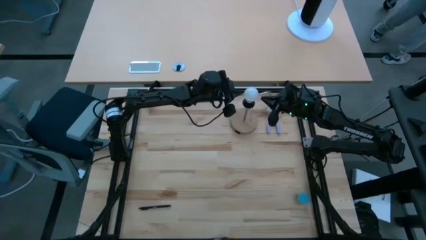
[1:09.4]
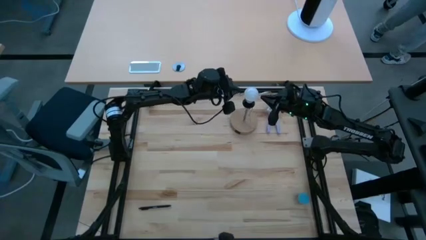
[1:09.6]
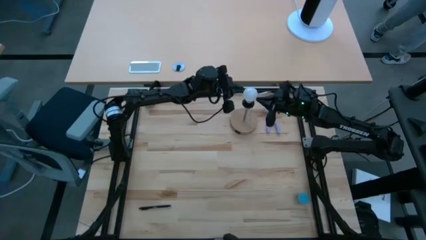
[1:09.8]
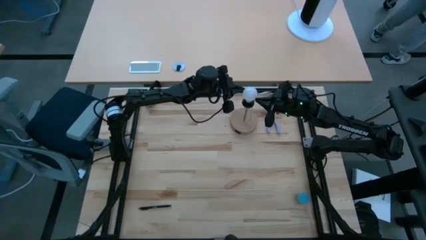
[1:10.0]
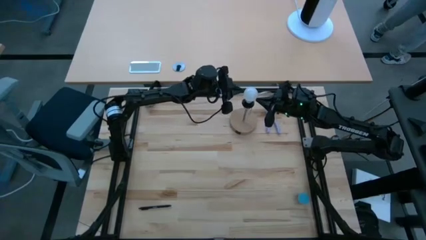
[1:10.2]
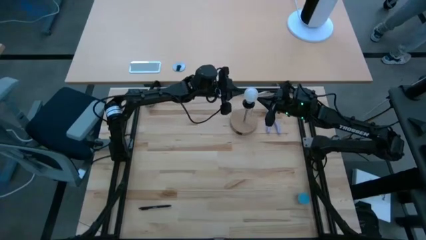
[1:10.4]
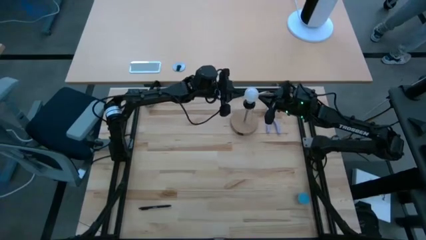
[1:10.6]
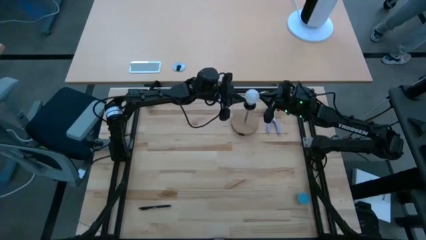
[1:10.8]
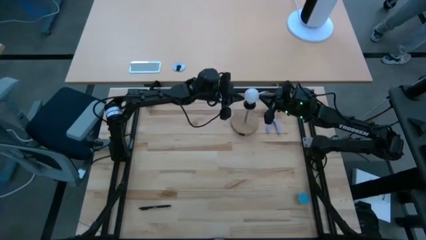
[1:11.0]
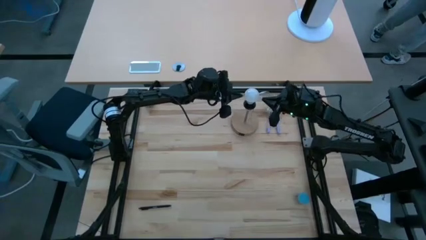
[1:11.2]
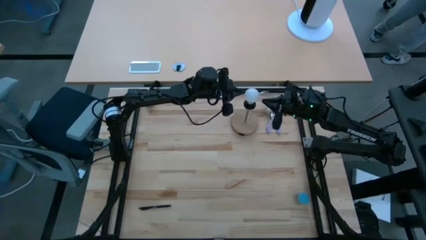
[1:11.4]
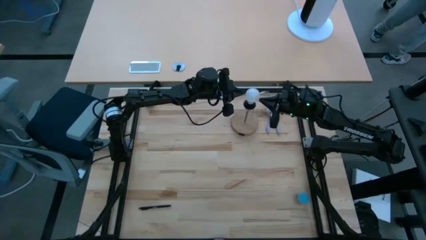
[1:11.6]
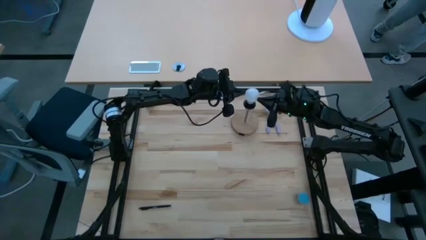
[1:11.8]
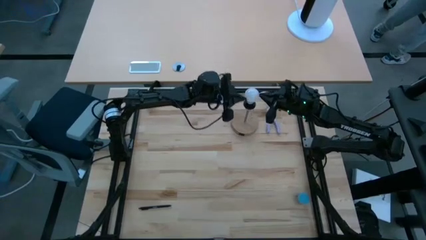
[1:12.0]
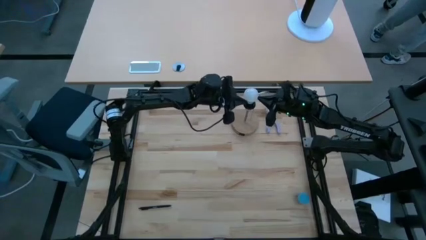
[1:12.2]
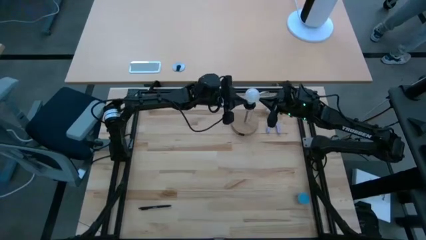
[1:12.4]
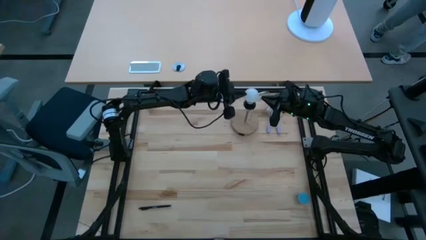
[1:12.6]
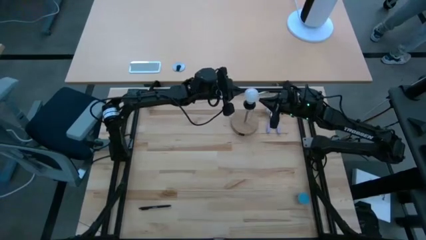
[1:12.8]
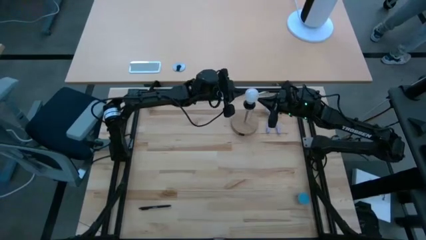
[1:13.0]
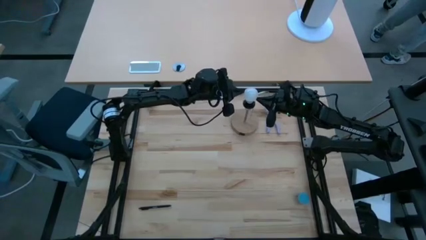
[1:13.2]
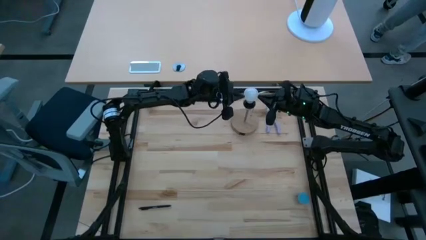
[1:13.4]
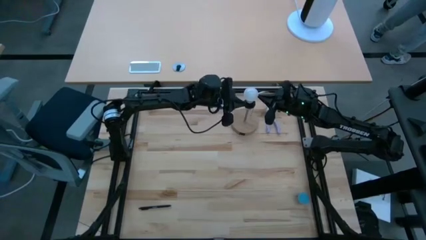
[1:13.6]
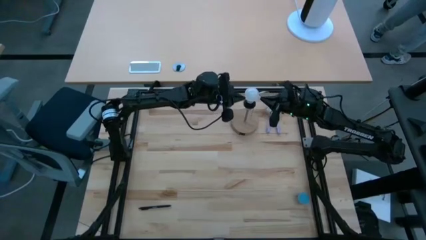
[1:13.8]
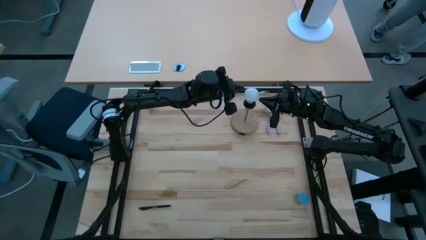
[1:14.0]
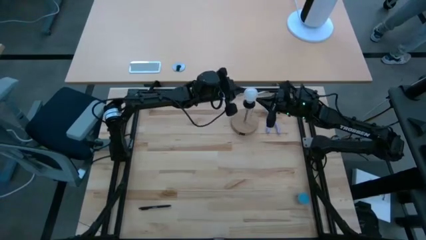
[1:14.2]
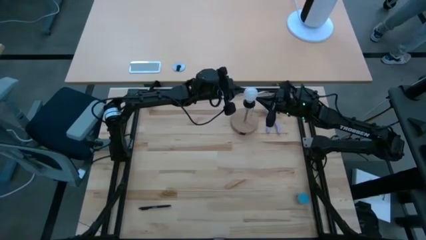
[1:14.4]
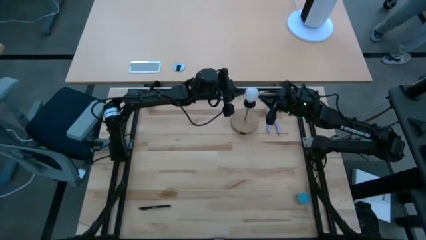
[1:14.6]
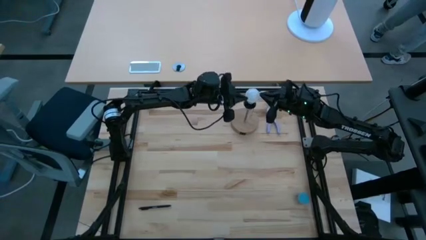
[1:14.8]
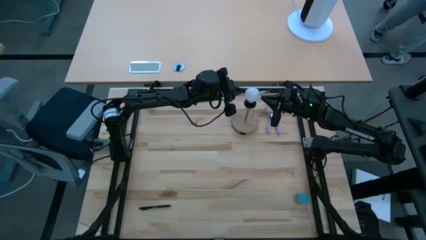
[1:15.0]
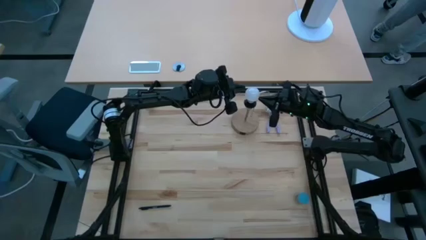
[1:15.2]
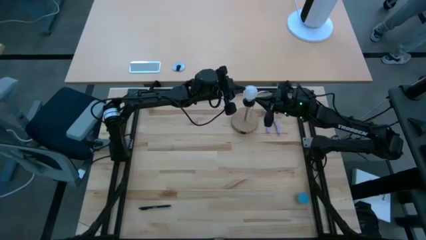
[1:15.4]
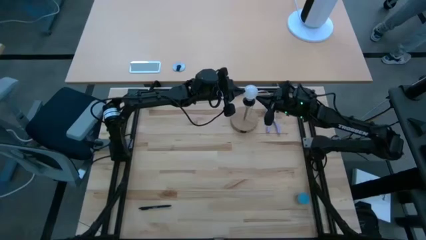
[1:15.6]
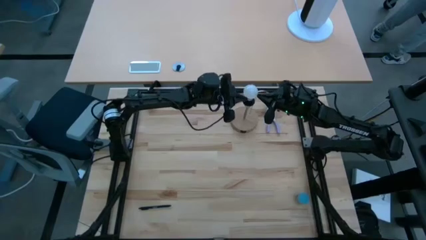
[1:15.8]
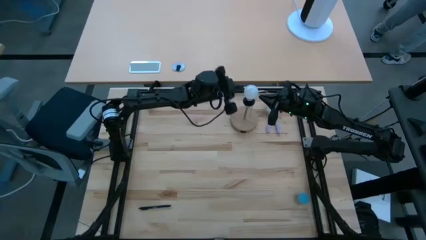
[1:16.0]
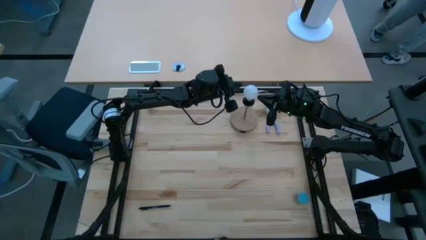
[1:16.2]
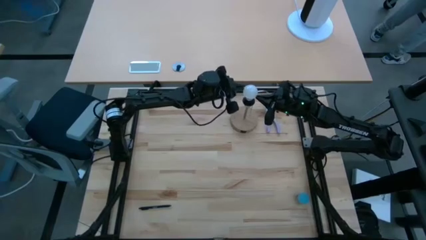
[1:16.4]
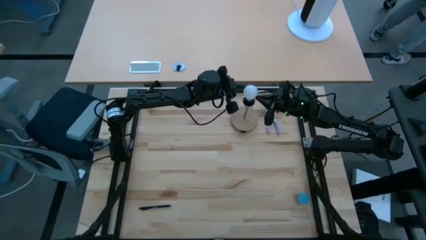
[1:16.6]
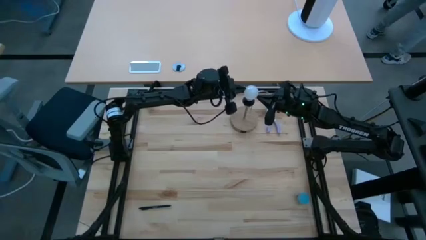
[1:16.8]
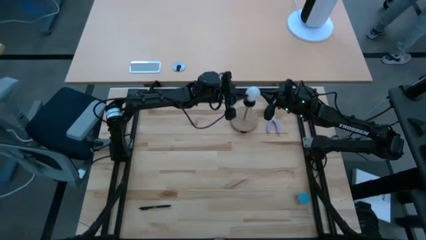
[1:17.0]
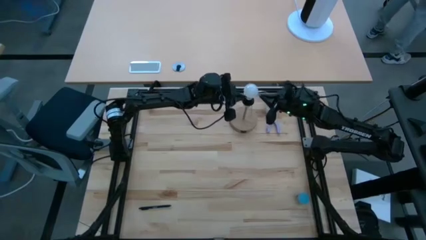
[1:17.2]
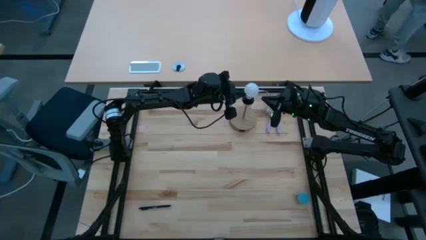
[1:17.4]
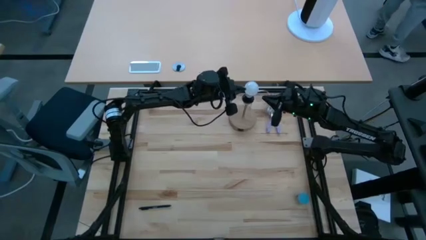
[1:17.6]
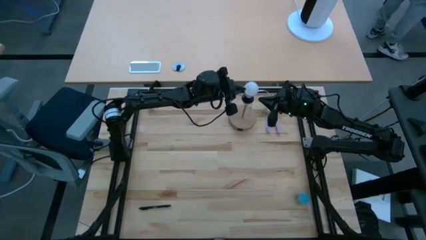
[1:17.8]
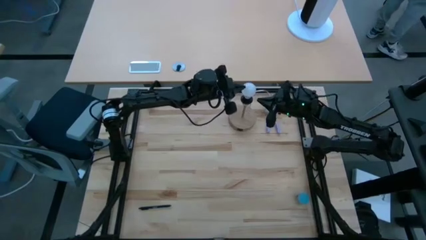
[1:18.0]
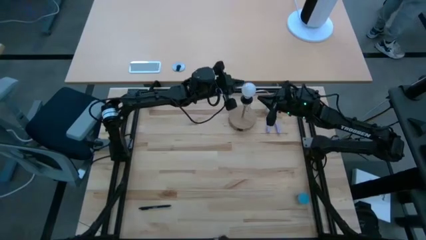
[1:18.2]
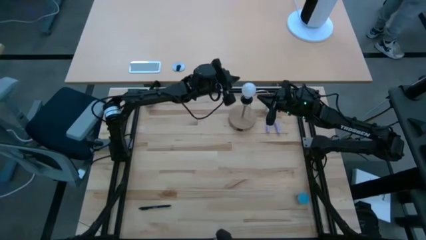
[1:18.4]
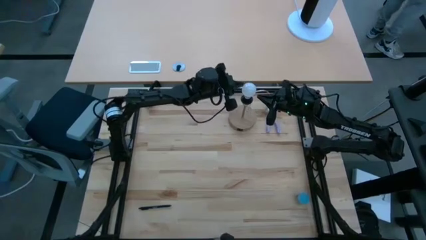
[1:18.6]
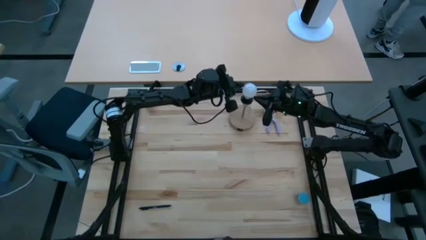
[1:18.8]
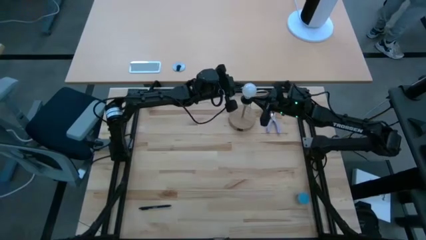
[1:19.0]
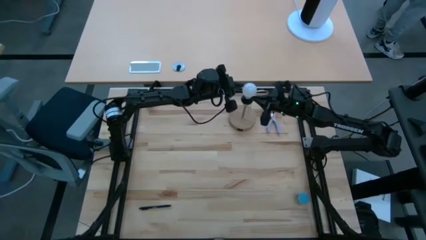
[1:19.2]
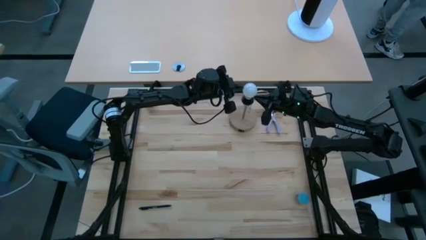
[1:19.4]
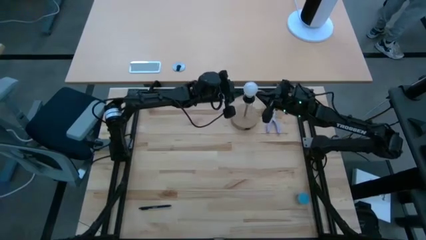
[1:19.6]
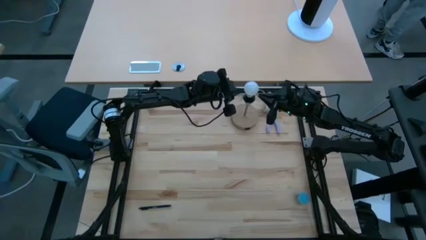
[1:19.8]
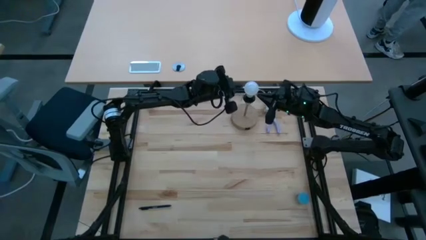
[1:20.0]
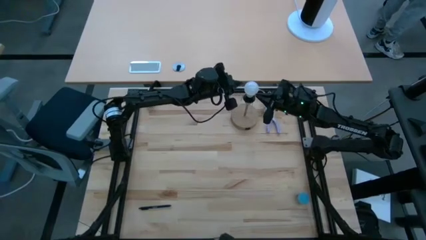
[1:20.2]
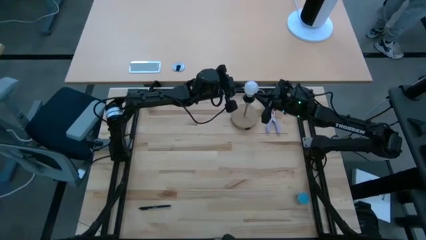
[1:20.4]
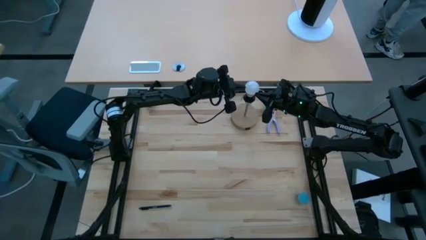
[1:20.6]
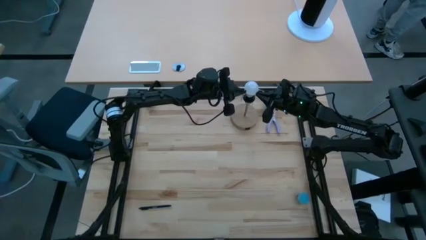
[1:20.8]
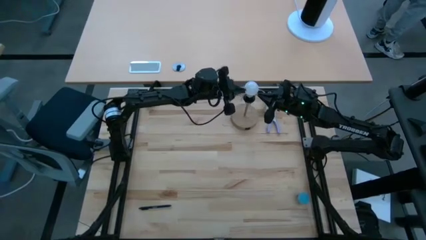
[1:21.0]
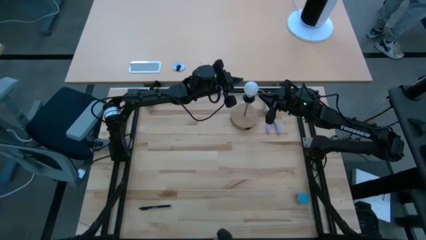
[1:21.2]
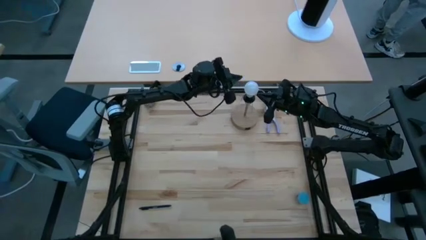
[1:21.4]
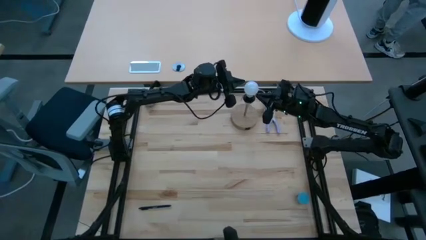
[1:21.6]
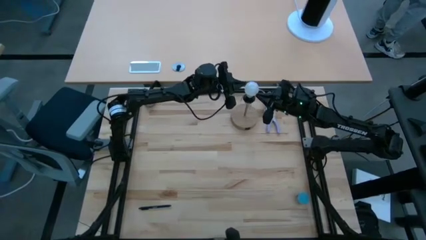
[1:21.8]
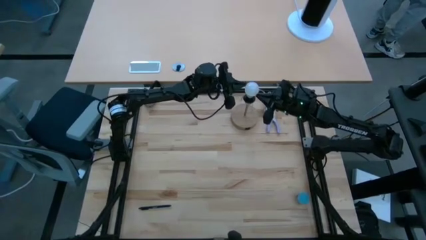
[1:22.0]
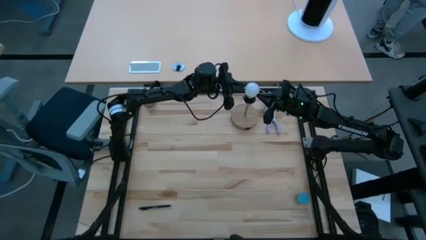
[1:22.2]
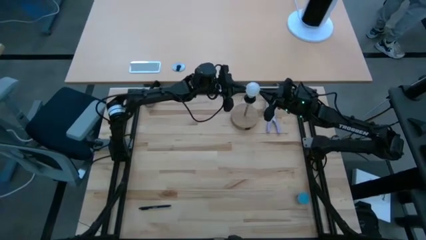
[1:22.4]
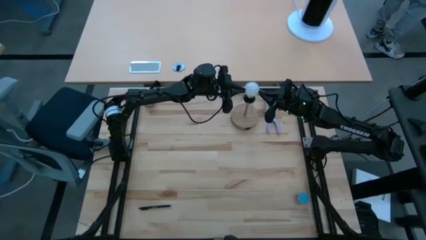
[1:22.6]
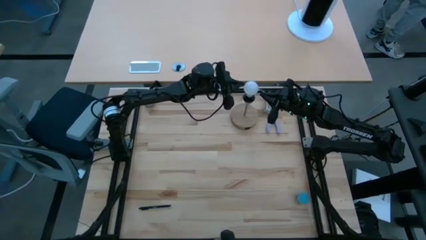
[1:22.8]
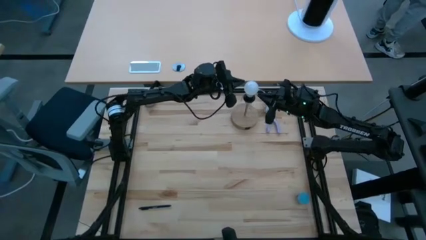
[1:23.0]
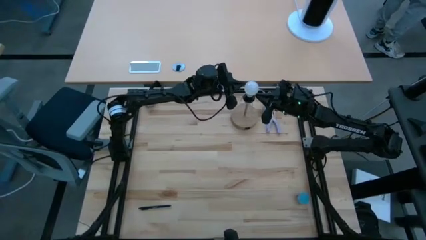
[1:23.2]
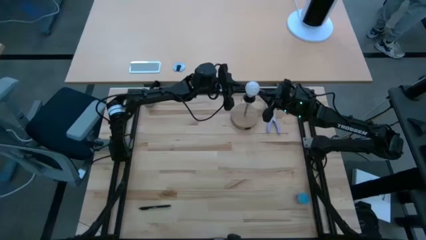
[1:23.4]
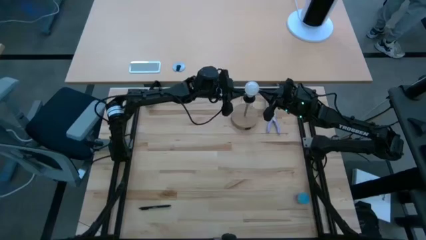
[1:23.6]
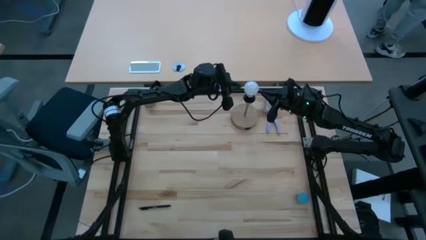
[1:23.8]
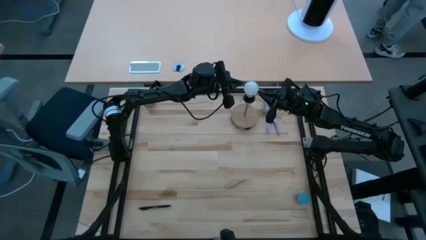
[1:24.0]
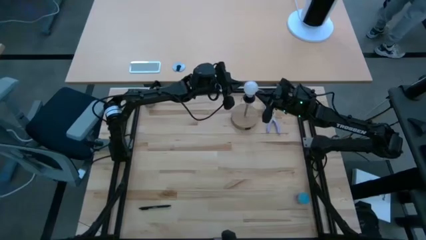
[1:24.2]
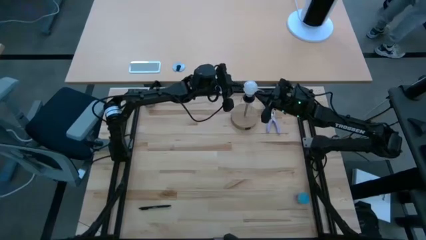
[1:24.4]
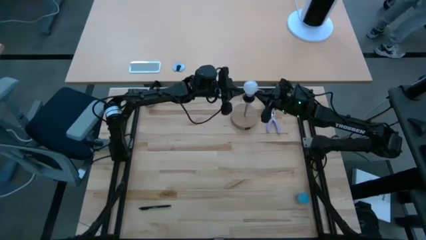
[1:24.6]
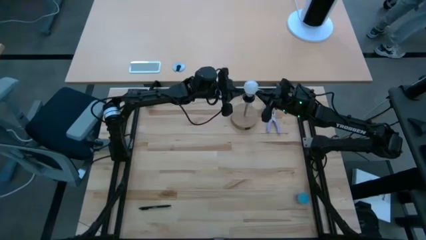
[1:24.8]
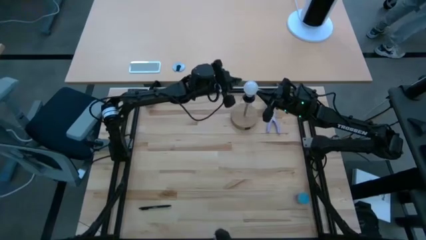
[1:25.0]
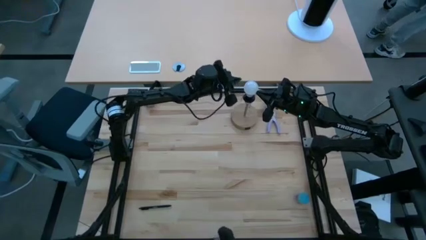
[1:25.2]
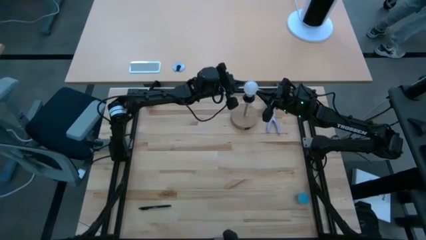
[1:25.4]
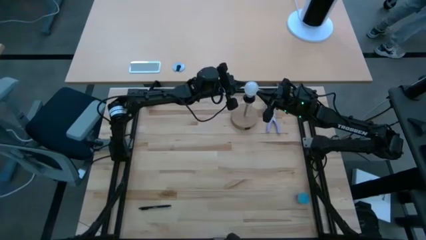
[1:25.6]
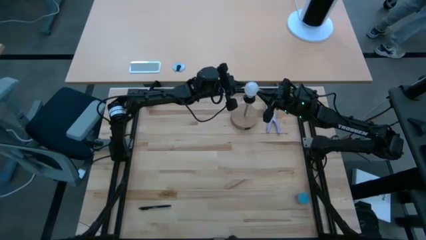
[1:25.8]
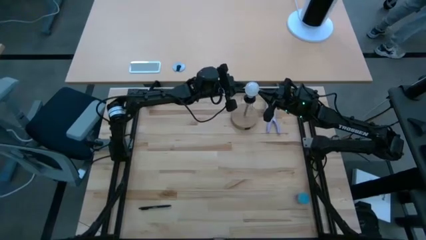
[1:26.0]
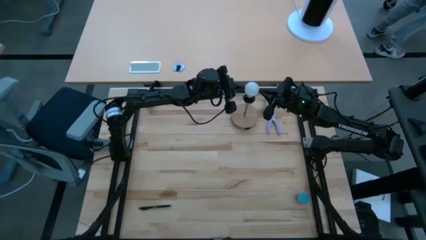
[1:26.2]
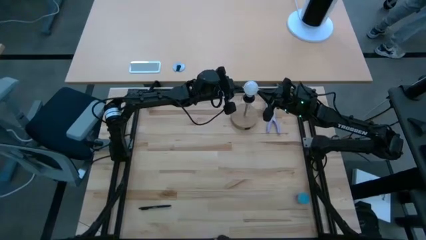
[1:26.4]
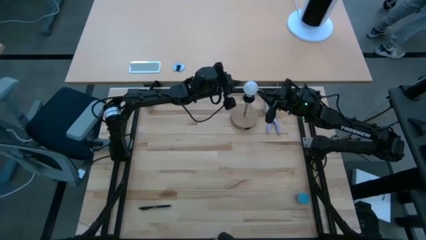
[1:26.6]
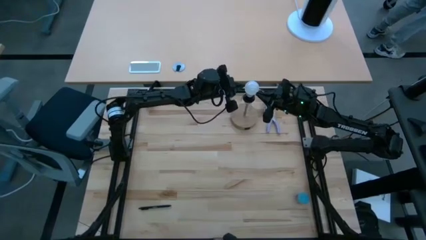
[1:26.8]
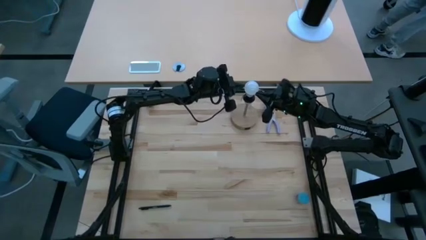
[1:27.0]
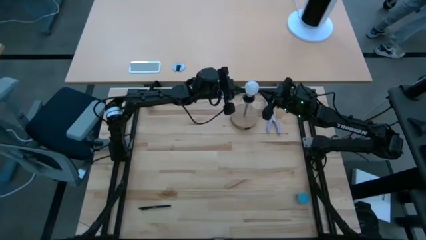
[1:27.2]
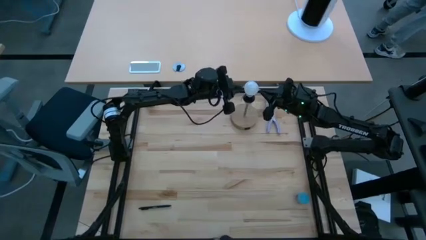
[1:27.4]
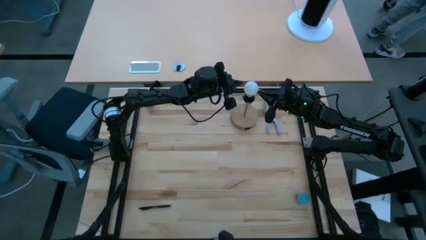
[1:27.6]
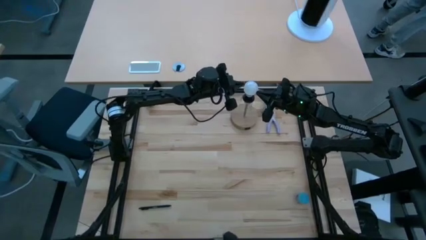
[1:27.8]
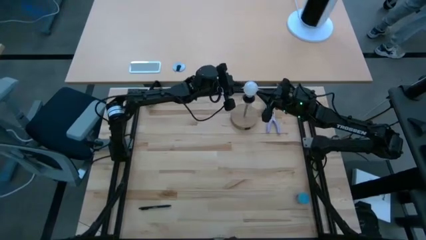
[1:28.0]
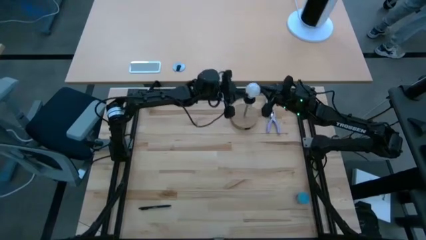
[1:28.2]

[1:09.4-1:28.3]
Task: Screw lightbulb
Remove the lightbulb from the lamp
